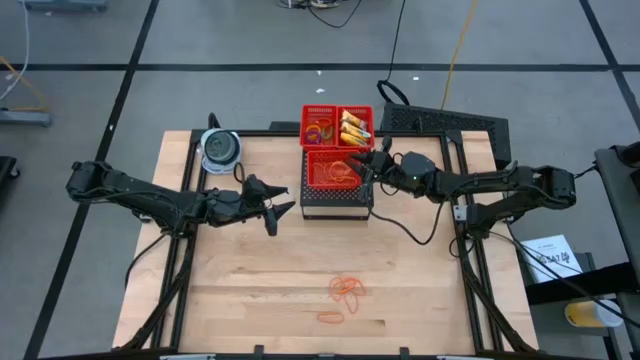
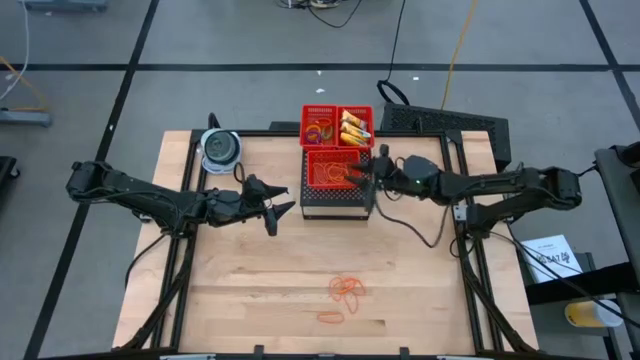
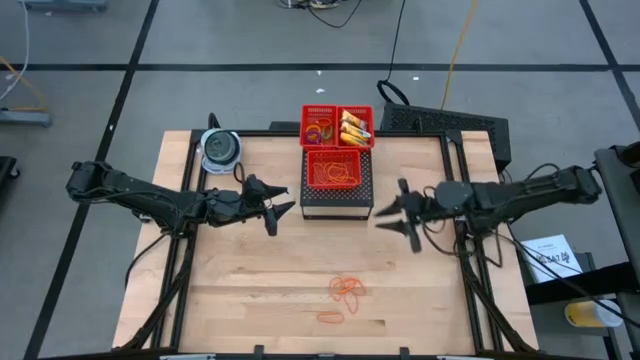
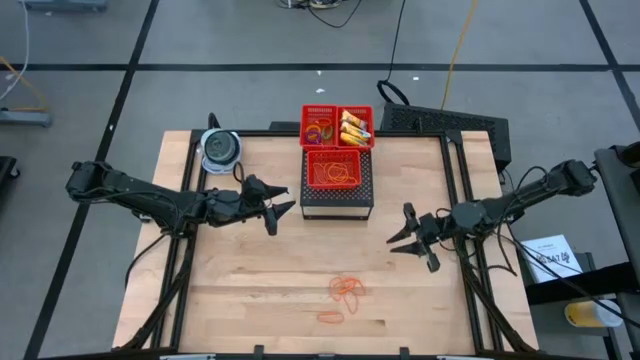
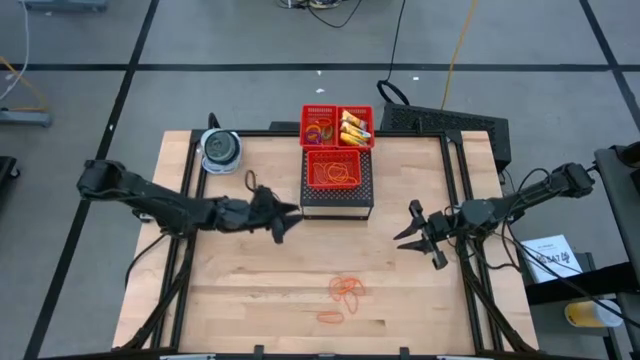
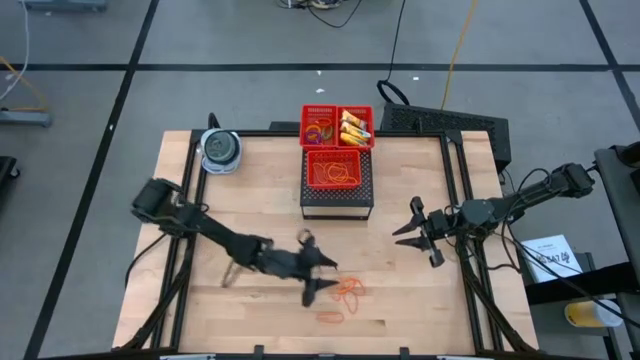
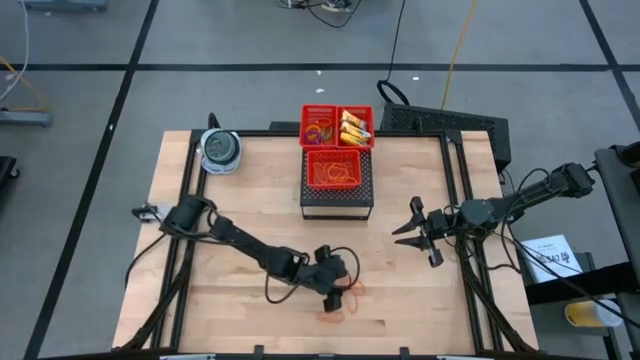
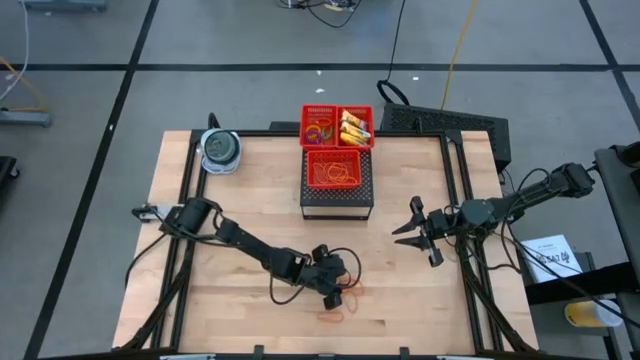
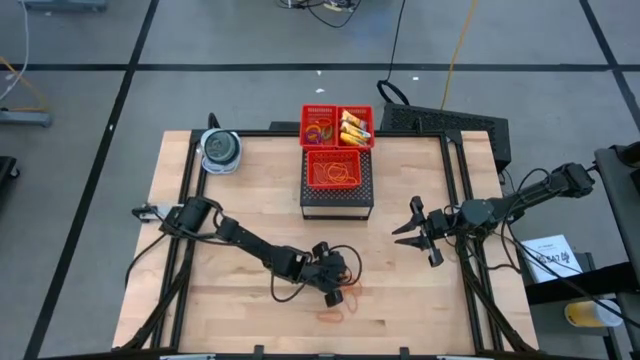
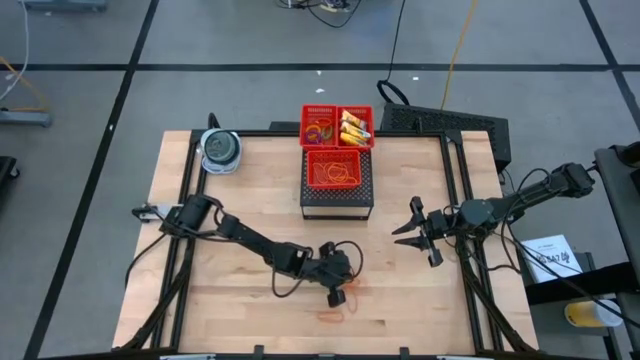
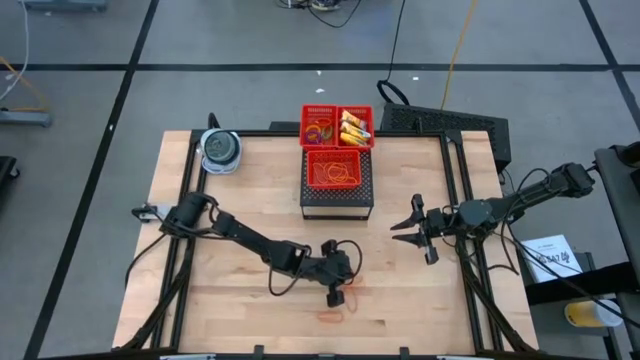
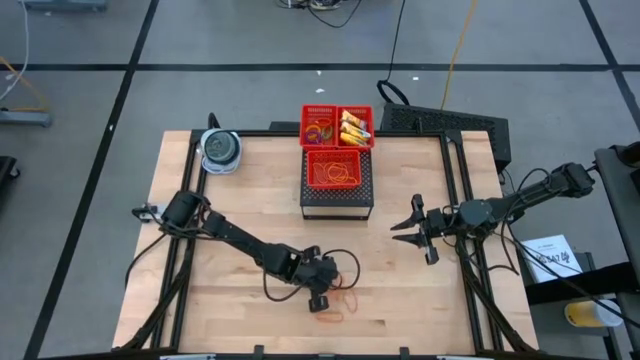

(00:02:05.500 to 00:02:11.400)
Task: Pick & Place Office Desk Supplies
Put the orange rubber band in the bottom red bin on the shelf

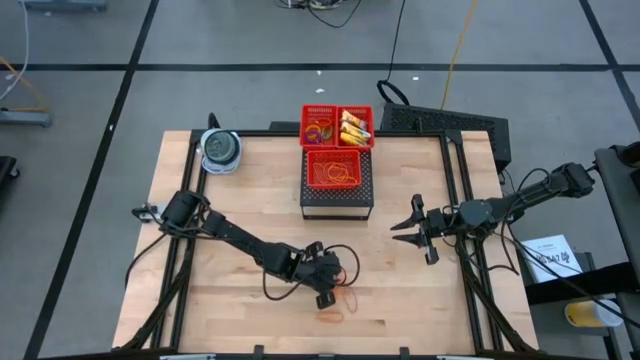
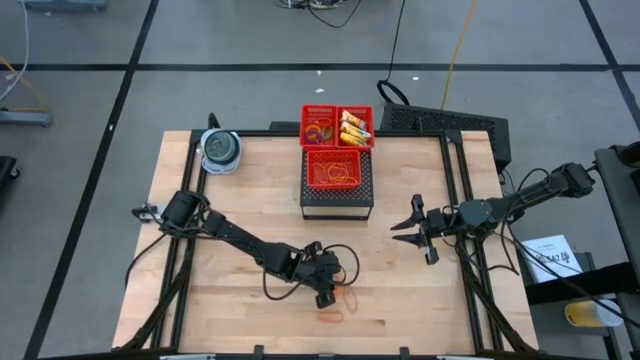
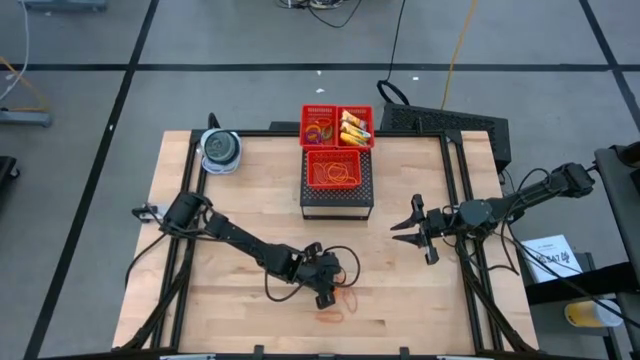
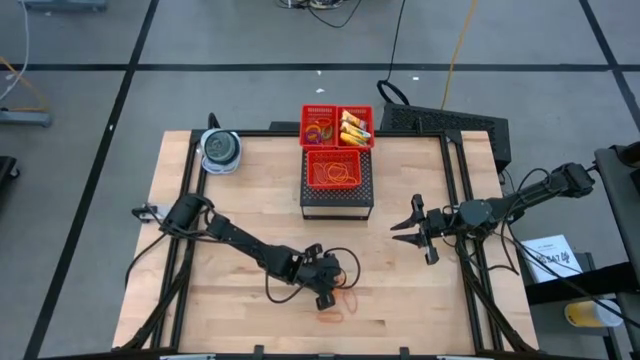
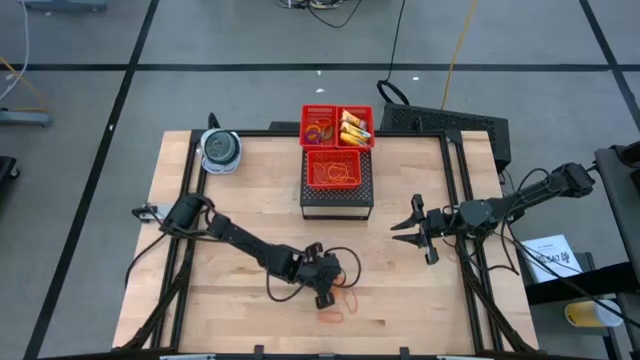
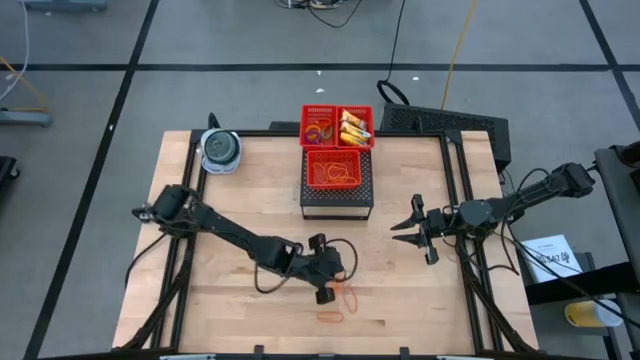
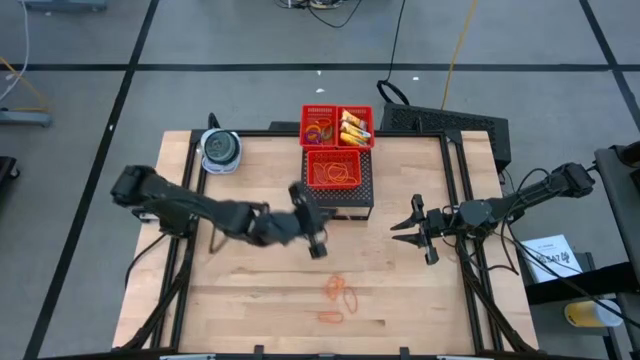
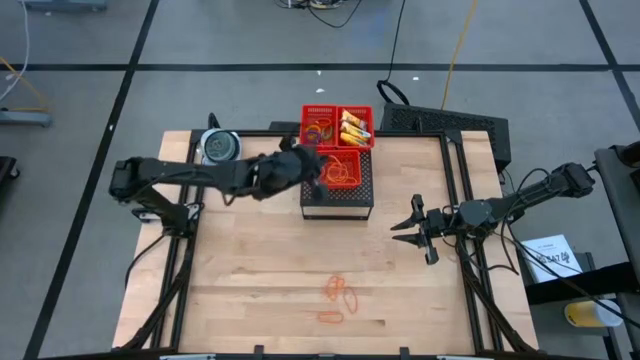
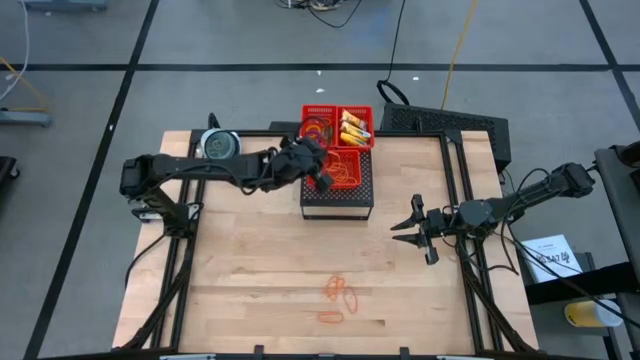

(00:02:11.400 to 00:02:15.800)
Put the orange rubber band in the bottom red bin on the shelf

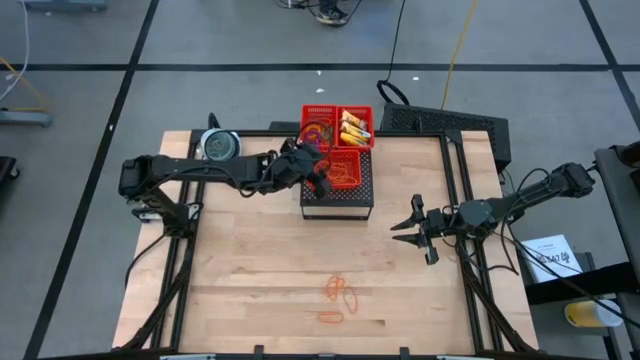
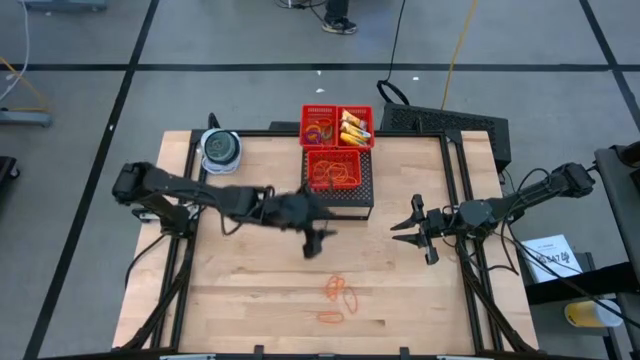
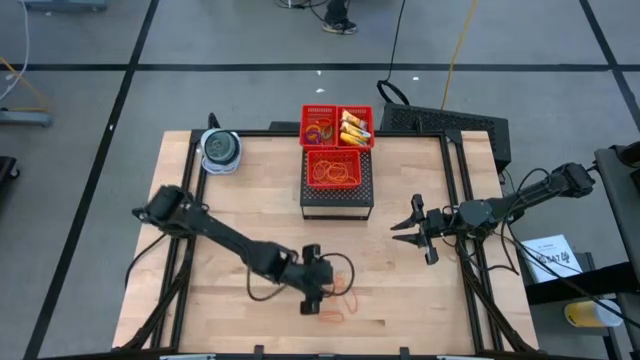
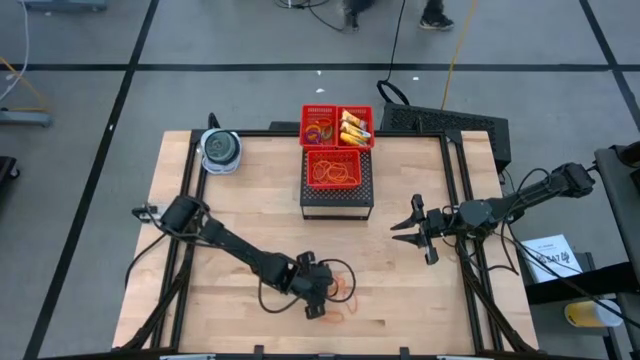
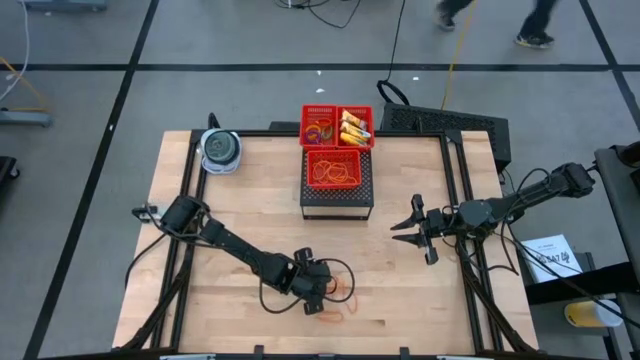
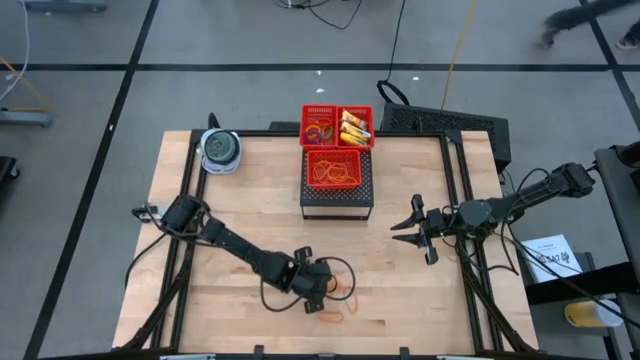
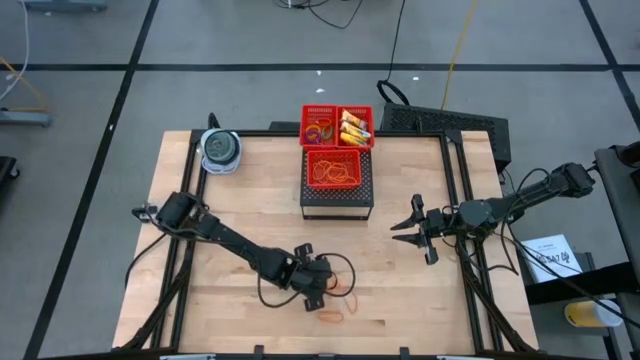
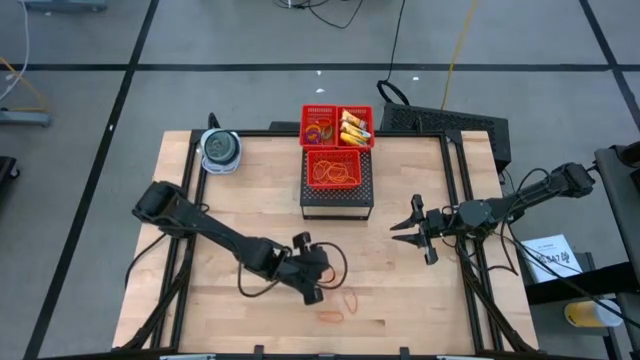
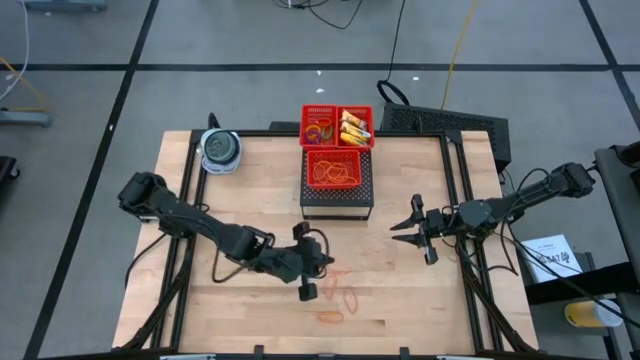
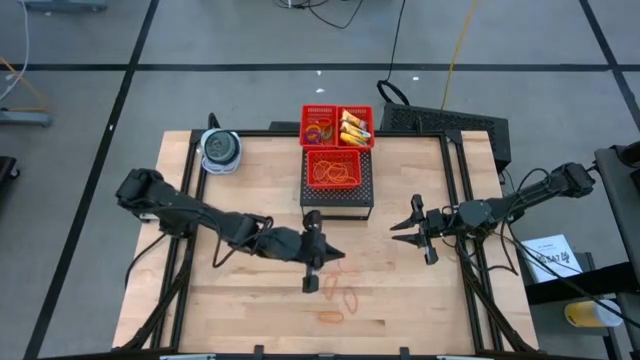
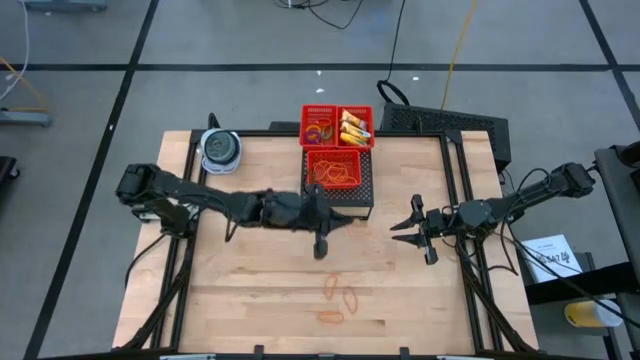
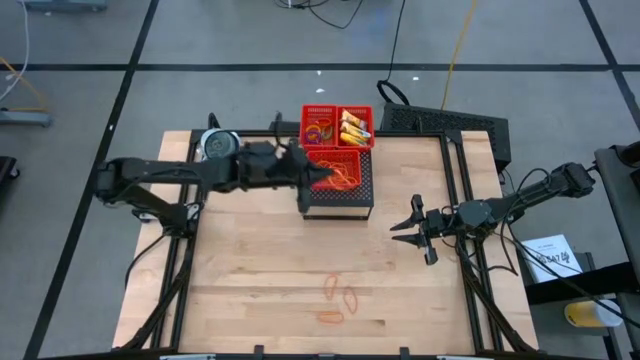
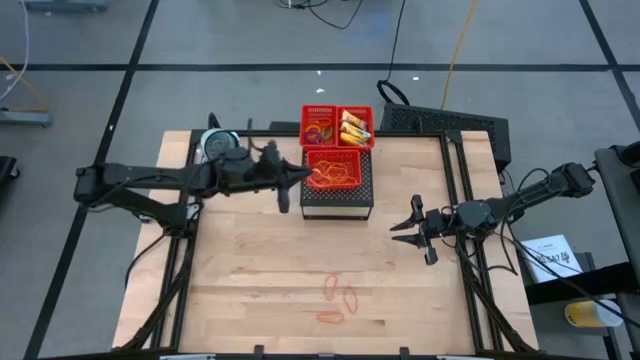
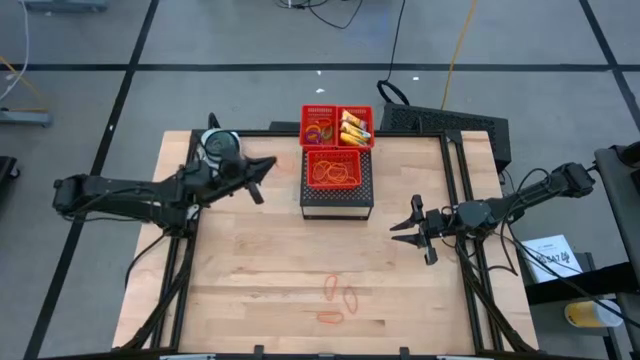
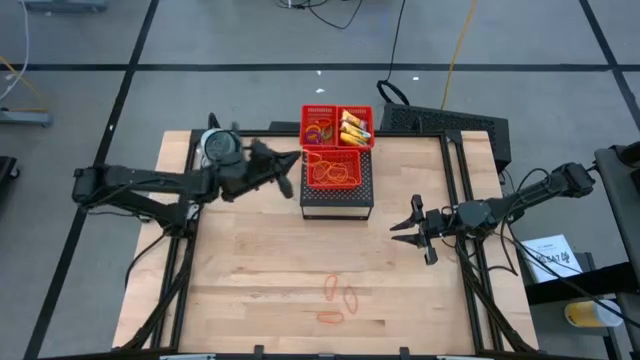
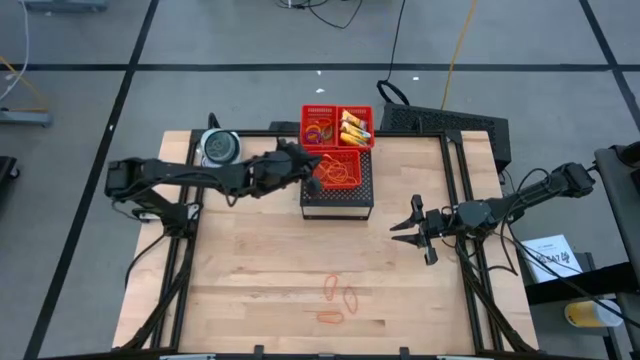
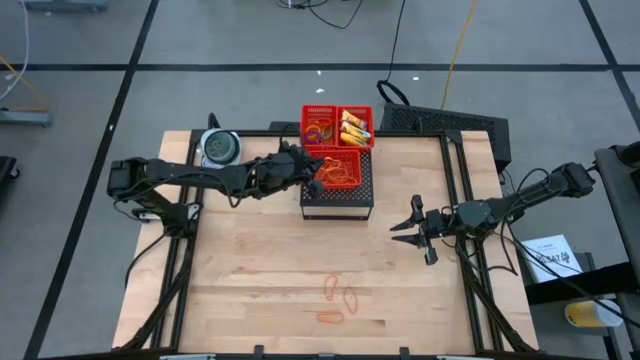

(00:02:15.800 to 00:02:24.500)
Put the orange rubber band in the bottom red bin on the shelf

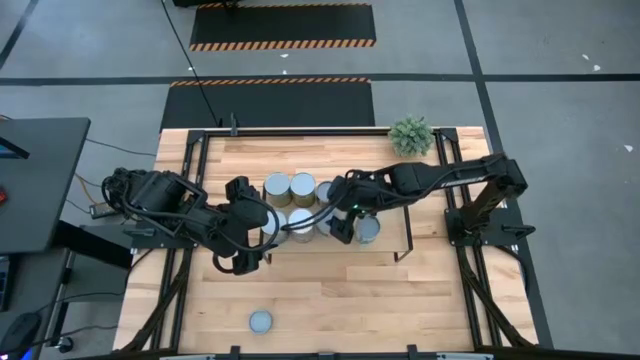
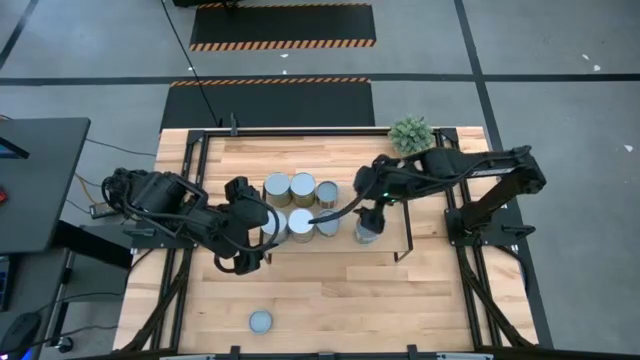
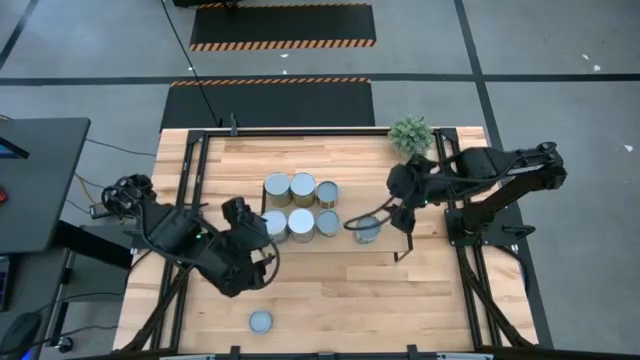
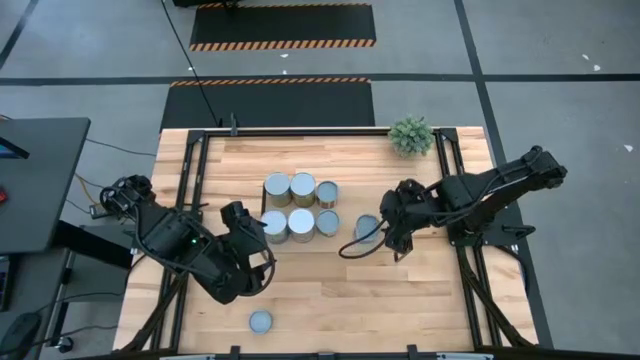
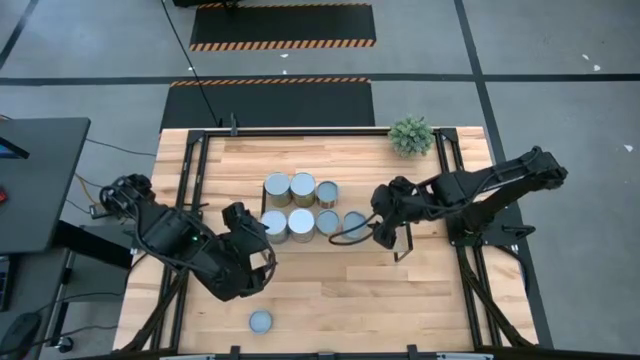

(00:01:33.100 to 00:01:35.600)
Task: Pick and place cans onto a shelf
Adjust the canned mix vegetable on the shelf
